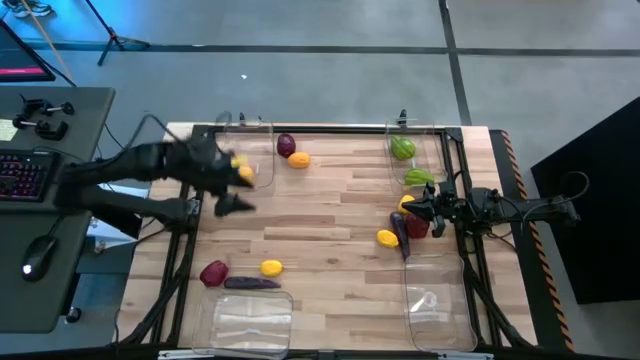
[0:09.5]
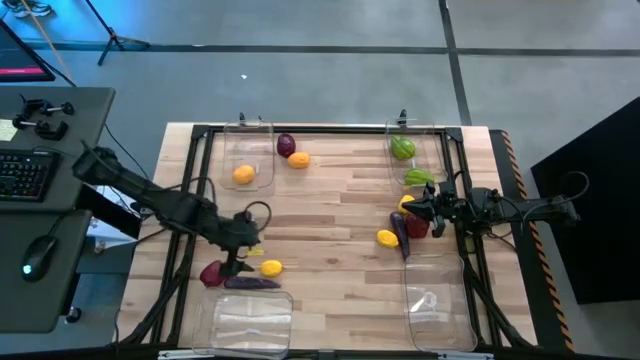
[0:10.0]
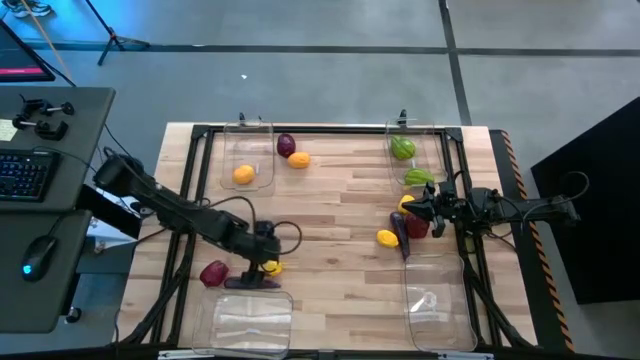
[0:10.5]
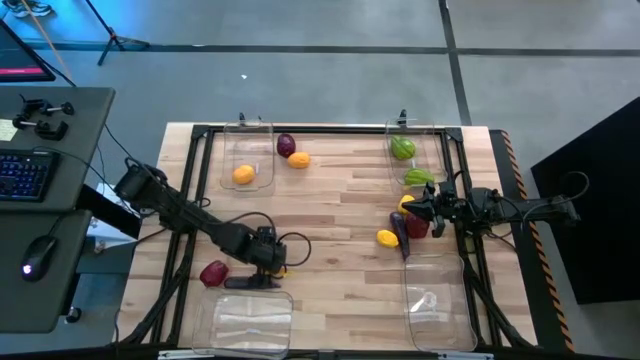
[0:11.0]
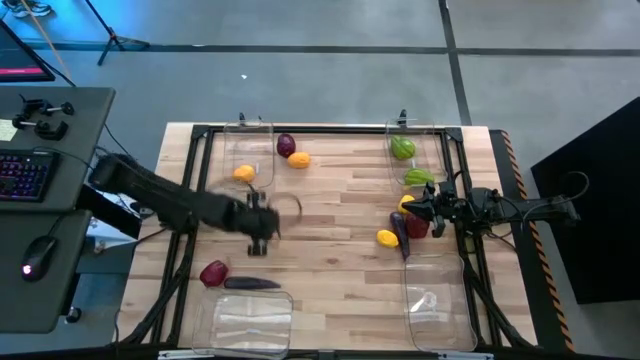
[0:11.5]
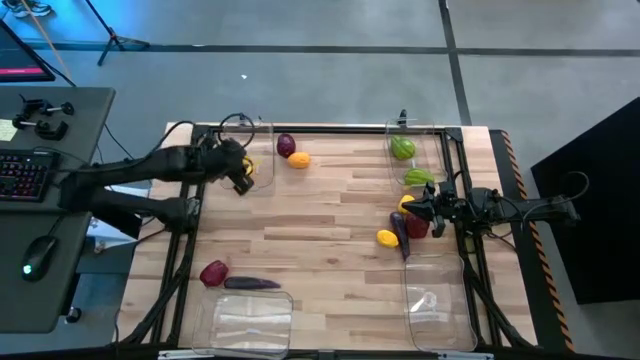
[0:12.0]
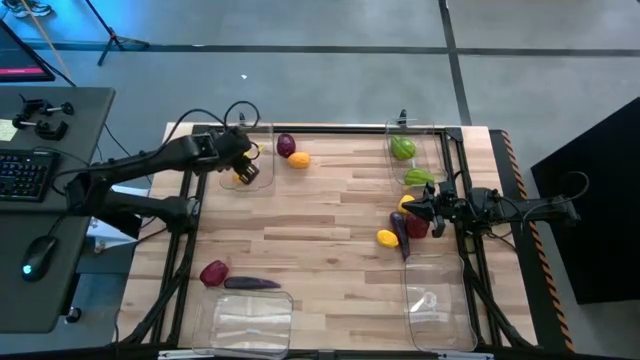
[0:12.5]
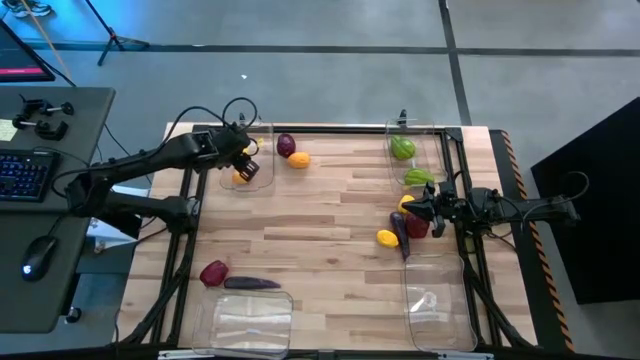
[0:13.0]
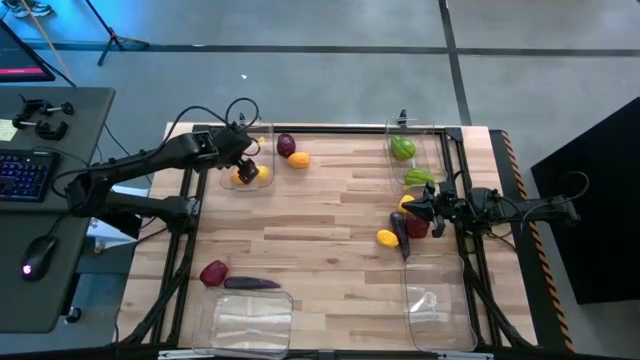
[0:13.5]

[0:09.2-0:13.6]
Task: Sort produce into baskets
Put the yellow lemon into the top left transparent bin

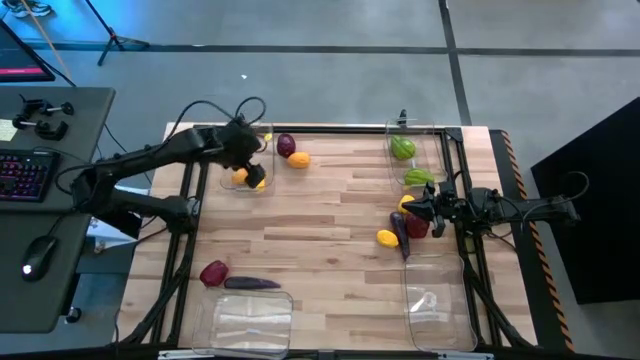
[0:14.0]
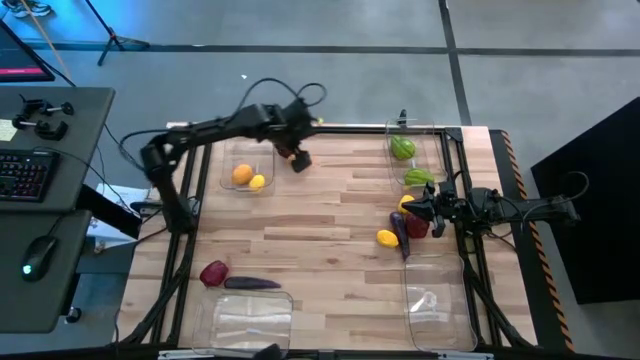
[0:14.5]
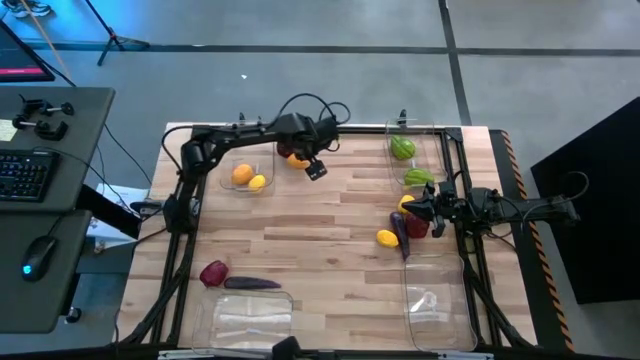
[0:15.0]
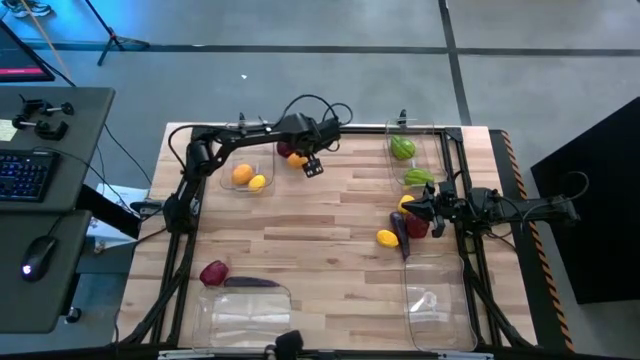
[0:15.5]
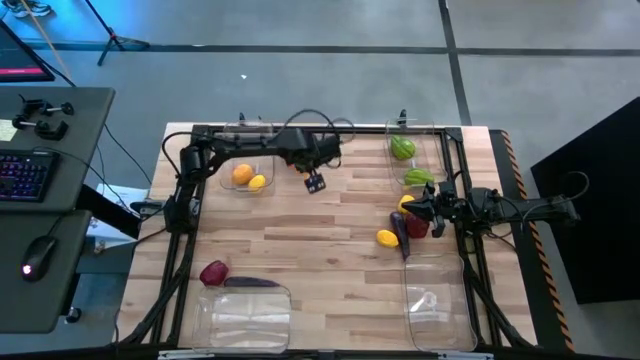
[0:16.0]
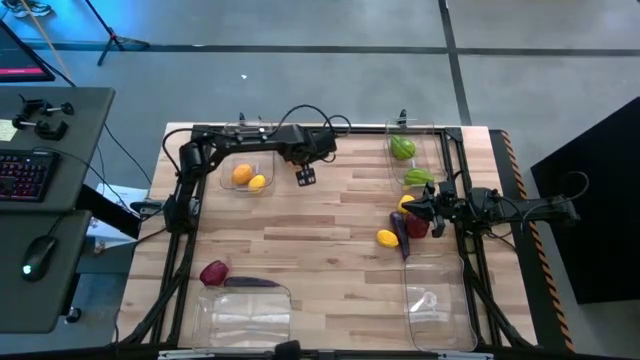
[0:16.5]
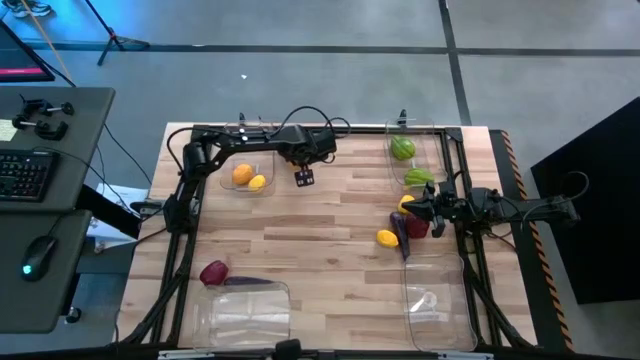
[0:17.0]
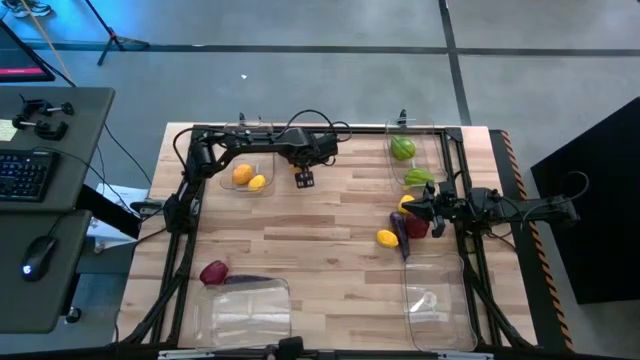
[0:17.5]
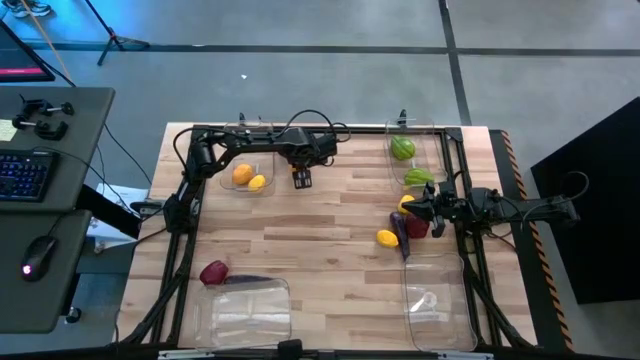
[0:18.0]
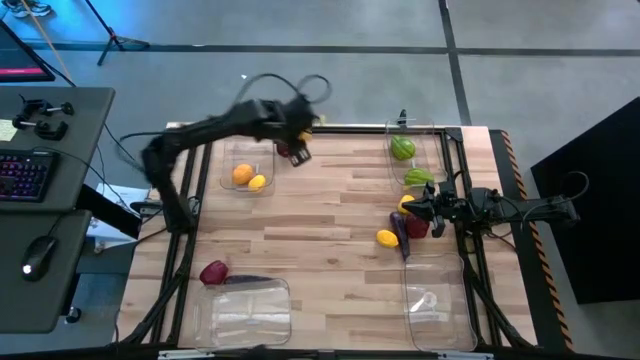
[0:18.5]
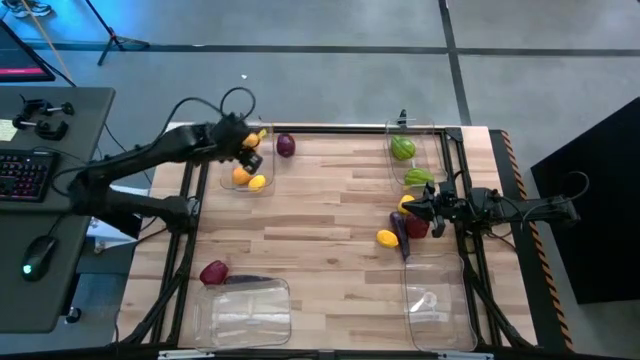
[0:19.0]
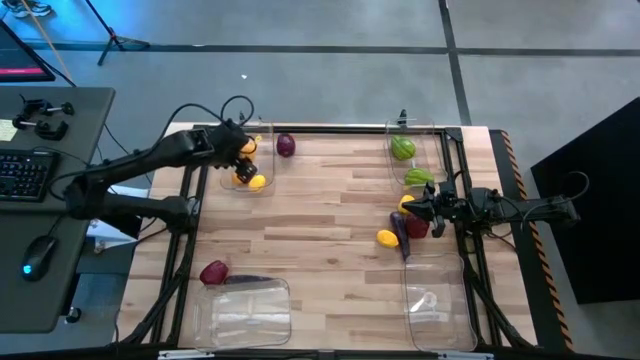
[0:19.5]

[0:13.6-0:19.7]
Put the yellow lemon into the top left transparent bin

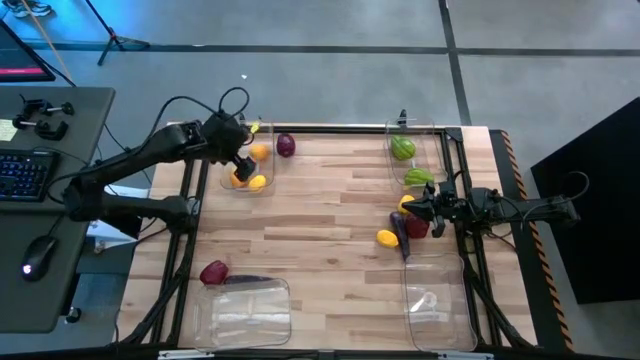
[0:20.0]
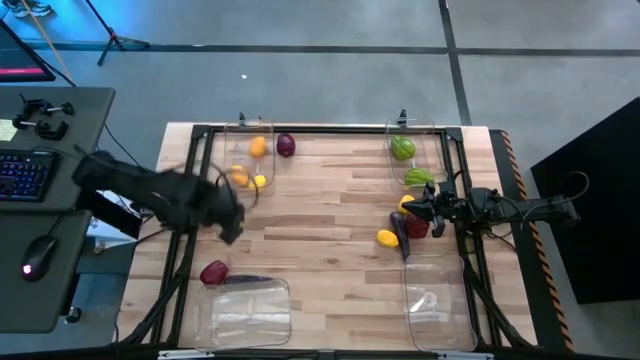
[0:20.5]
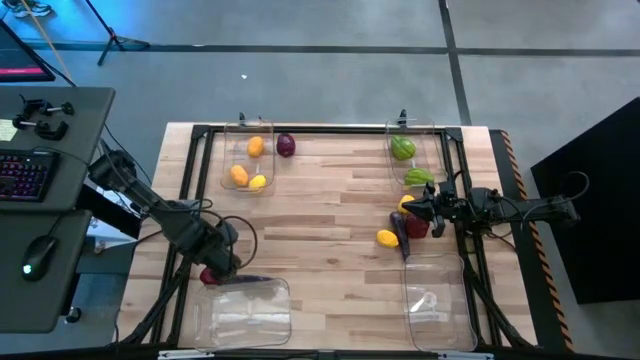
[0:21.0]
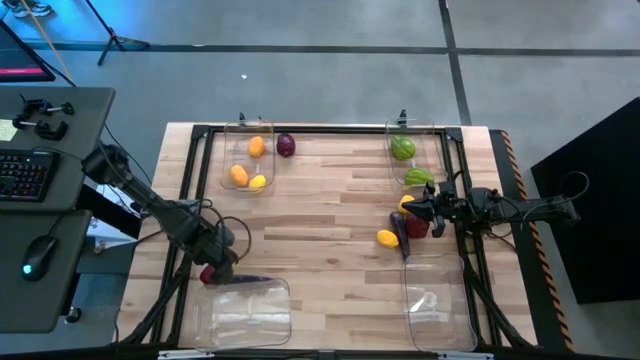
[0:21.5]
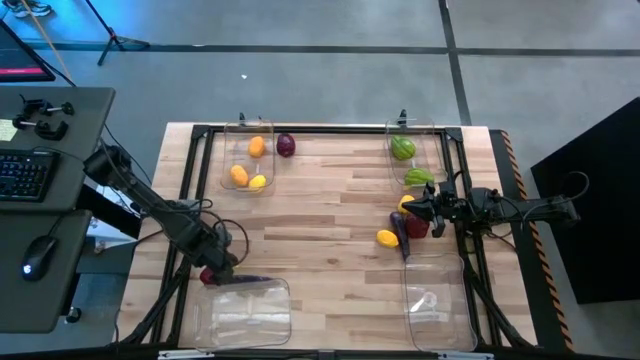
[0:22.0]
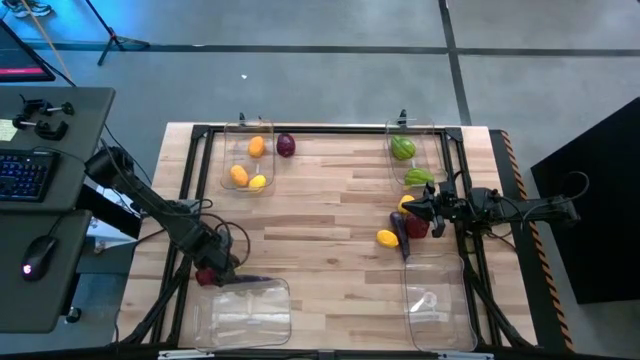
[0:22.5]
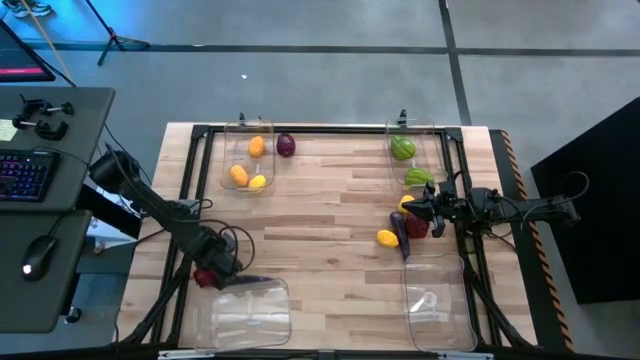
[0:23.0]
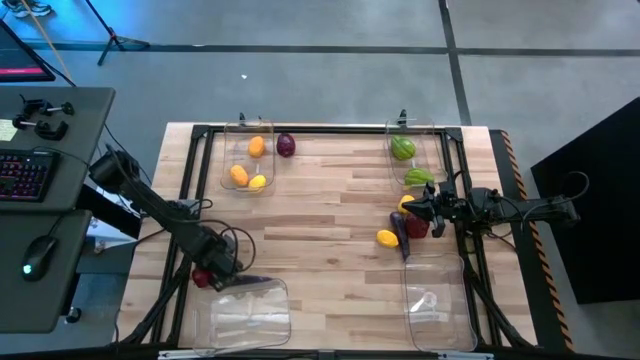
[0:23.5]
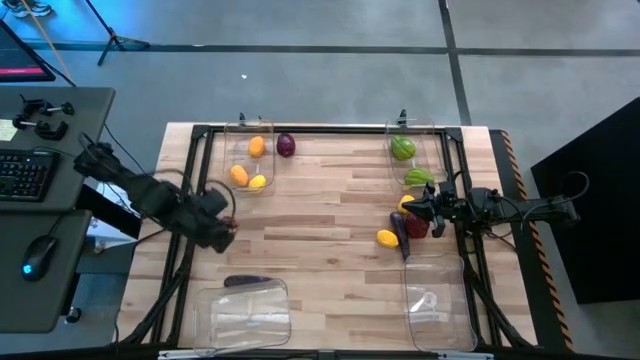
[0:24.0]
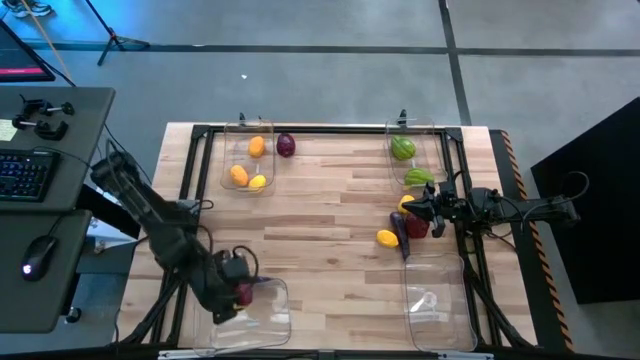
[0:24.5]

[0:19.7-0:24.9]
Put the red apple into the bottom left transparent bin

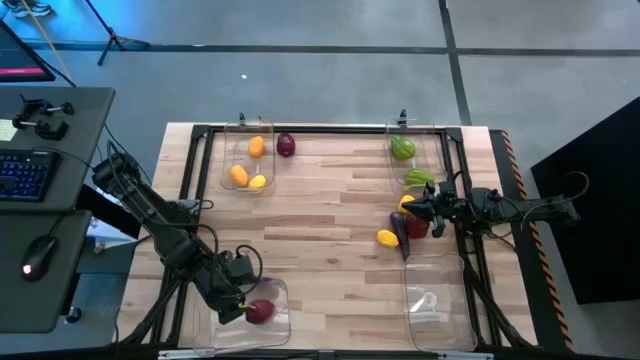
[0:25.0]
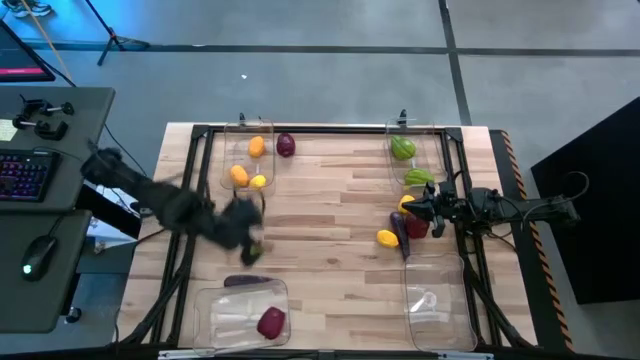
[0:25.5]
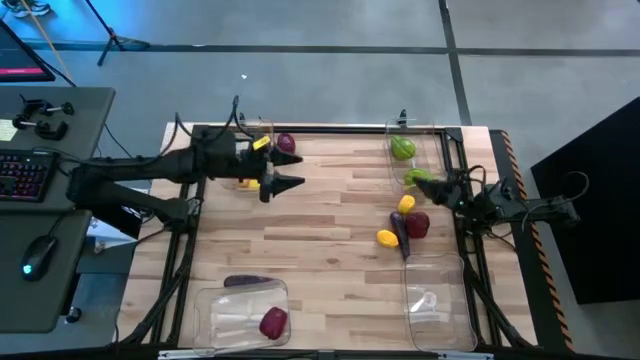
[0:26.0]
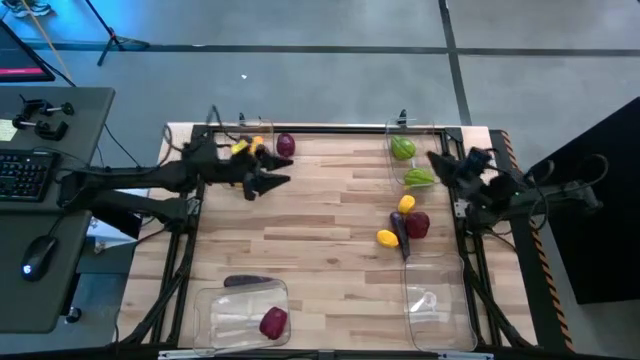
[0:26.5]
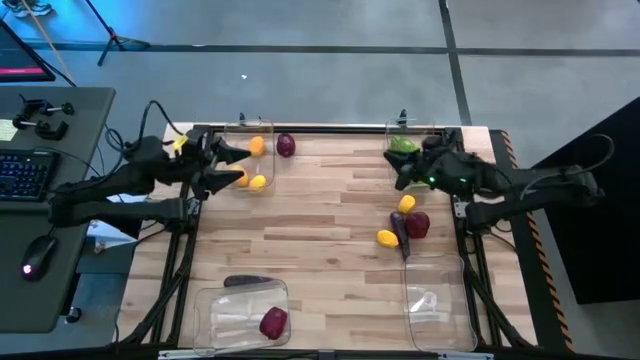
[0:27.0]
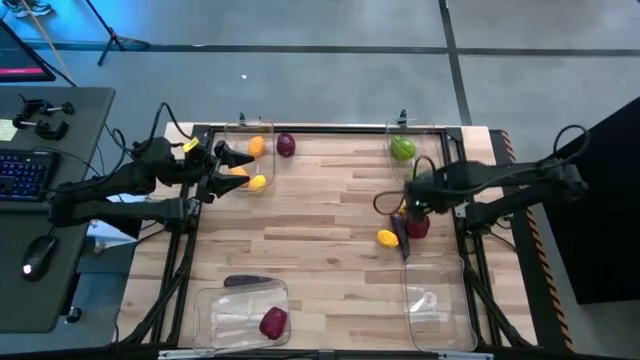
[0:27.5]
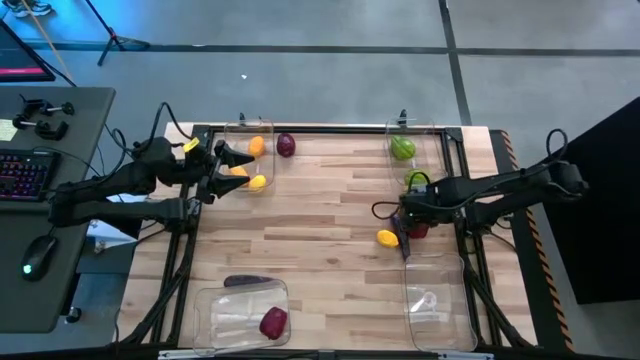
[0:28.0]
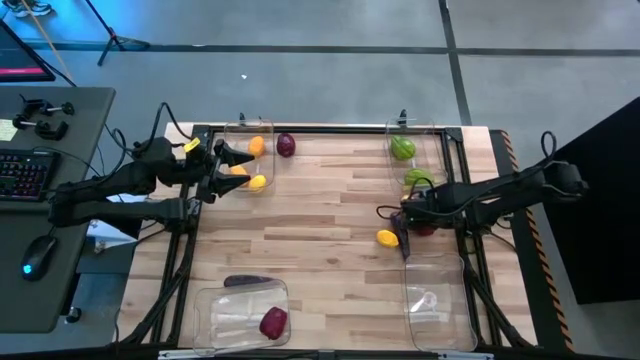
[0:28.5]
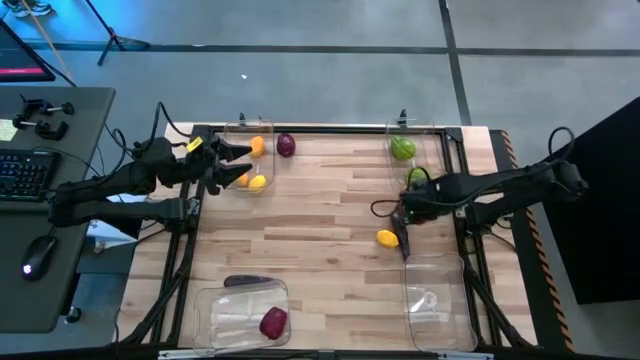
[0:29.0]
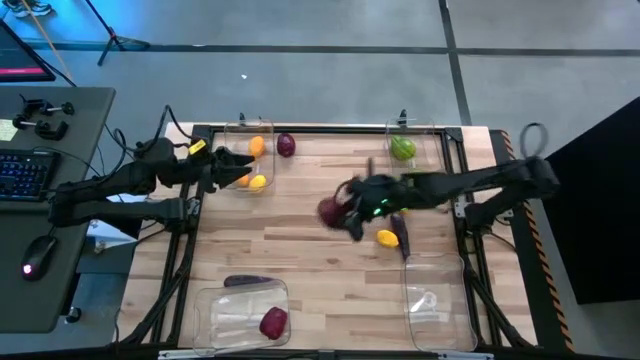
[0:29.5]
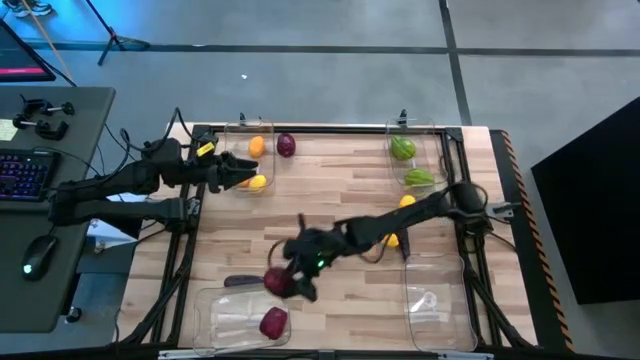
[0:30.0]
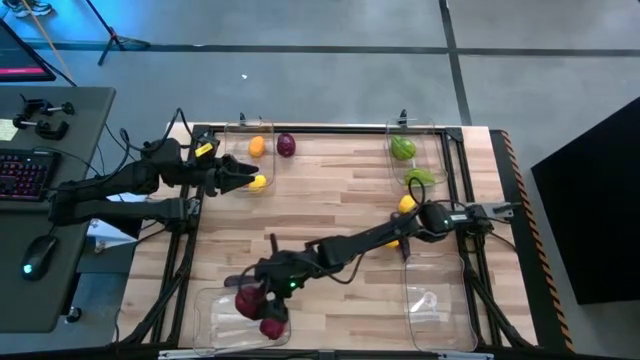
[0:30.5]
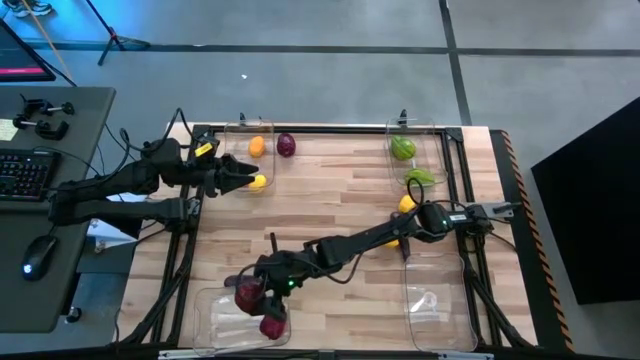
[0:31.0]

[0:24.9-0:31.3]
Put the red apple into the bottom left transparent bin
